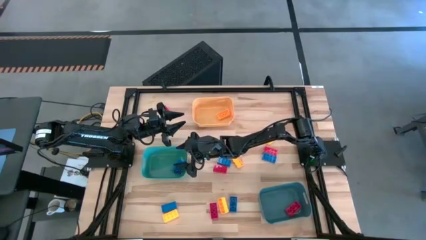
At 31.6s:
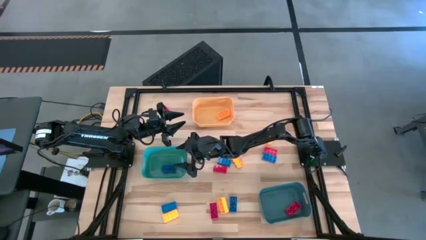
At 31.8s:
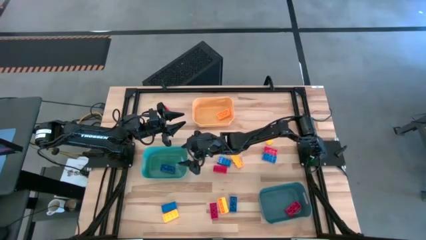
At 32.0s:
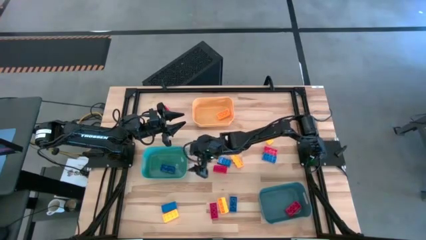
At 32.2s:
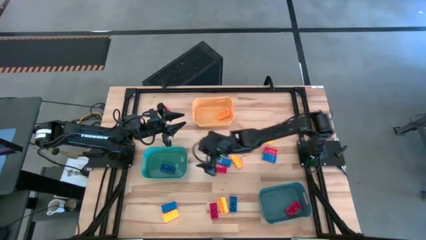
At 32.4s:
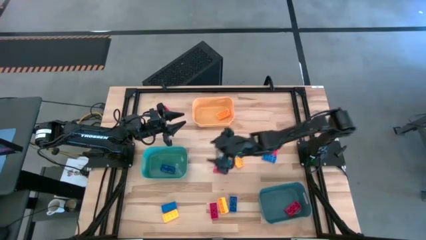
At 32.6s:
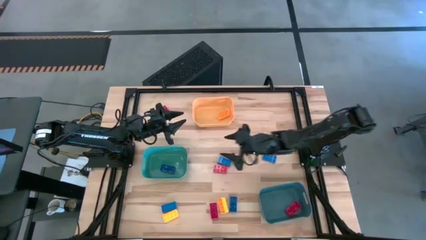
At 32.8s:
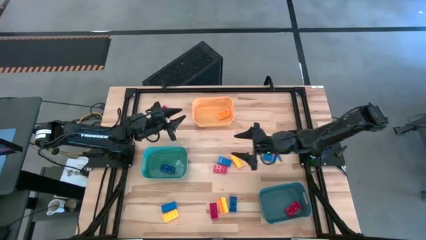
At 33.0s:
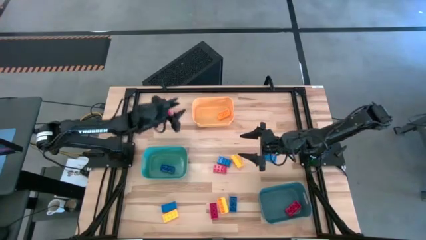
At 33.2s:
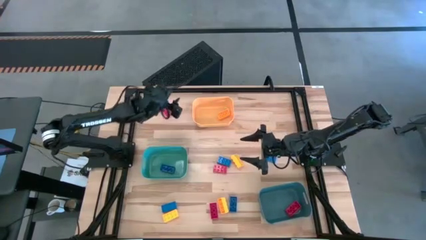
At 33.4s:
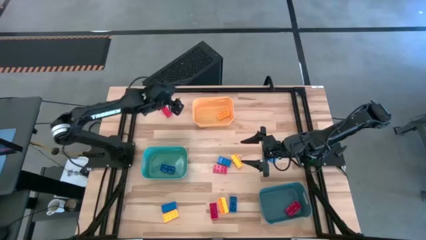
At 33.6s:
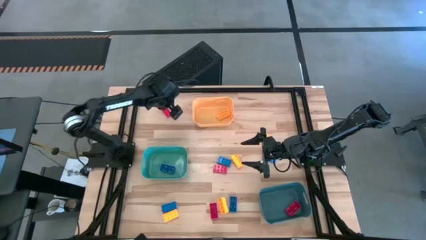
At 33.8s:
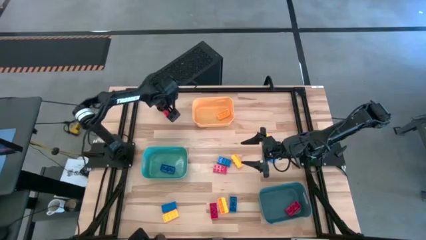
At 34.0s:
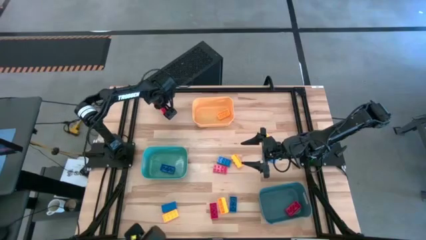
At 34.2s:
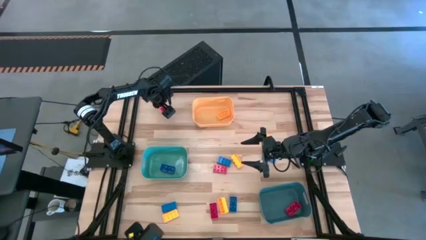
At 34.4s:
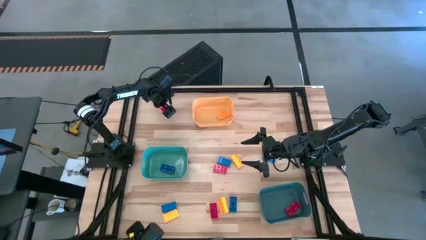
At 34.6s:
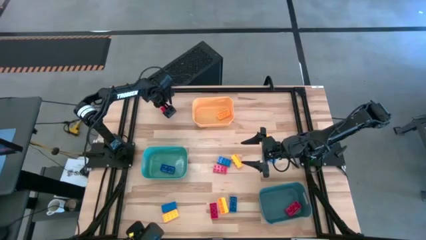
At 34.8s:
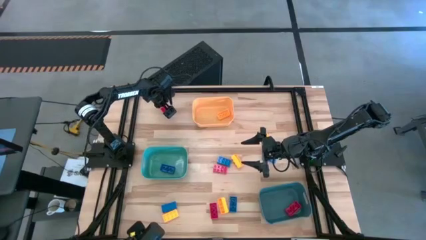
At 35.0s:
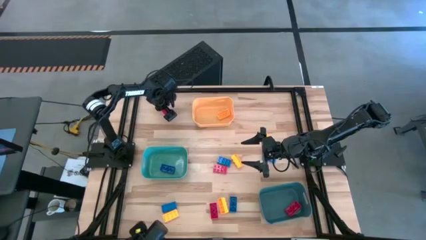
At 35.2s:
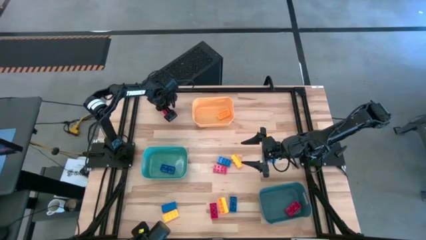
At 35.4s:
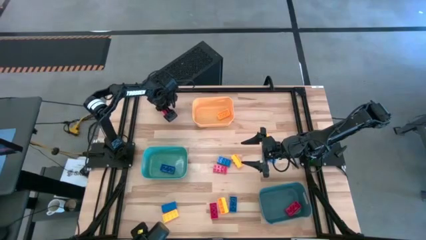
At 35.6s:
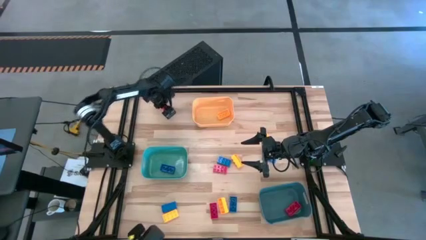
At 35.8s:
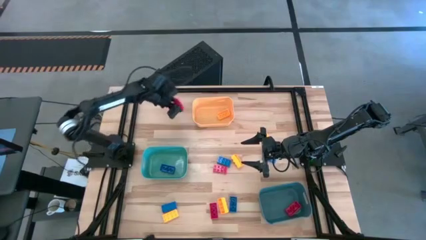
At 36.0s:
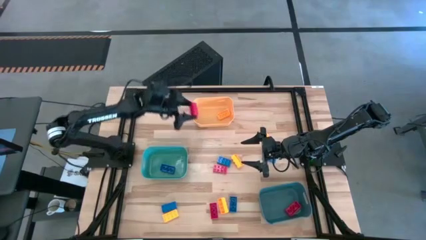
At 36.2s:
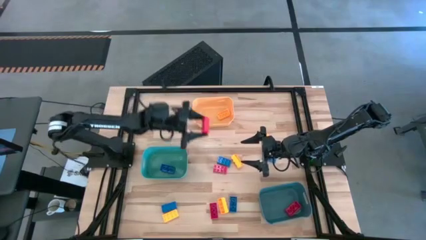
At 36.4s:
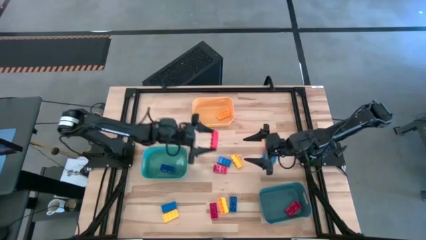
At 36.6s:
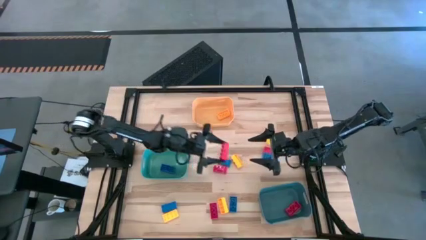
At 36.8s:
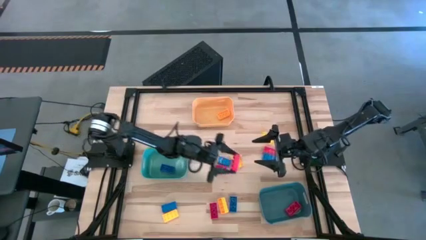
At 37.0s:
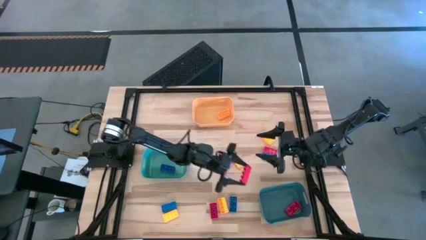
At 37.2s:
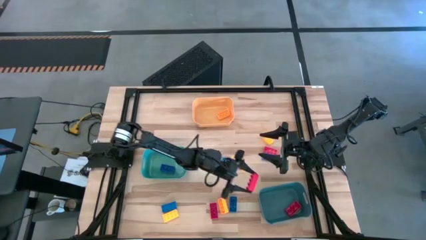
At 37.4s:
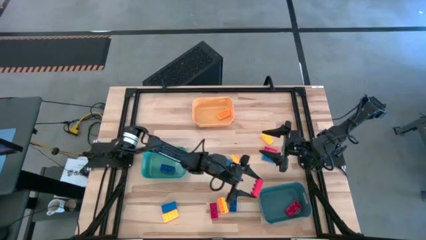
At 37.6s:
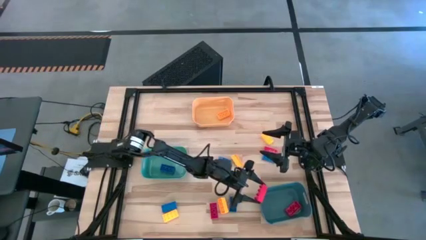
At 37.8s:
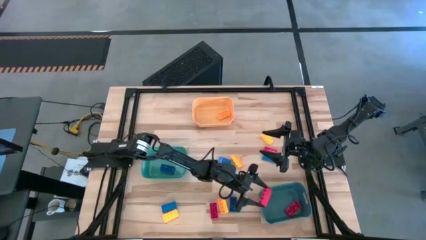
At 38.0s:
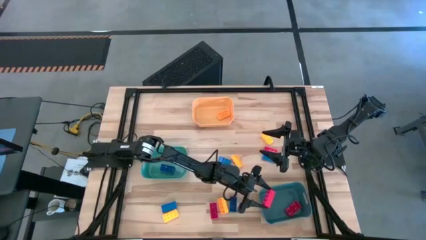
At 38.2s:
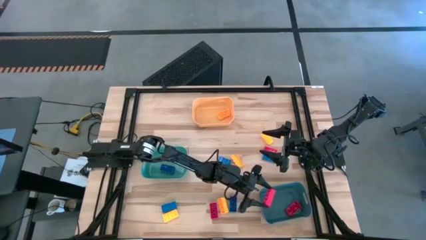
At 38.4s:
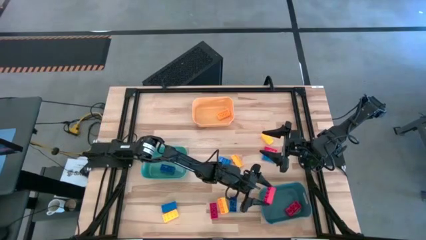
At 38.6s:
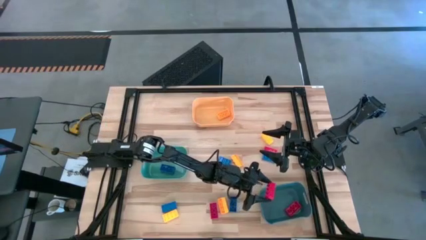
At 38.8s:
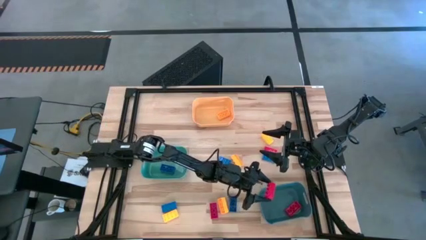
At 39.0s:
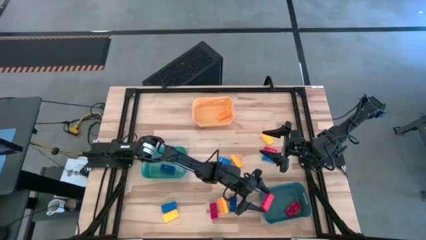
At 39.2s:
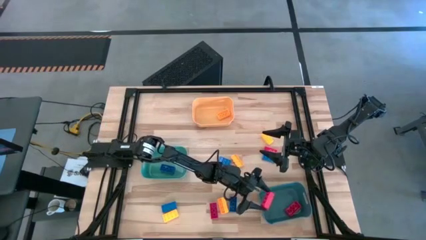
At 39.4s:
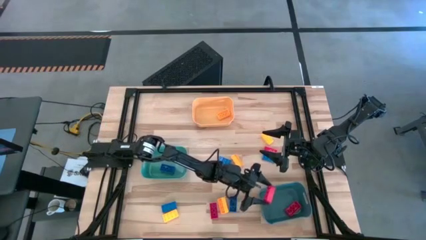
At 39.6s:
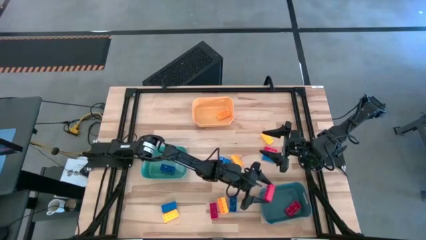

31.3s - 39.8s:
Task: Sort & place blocks by color
Put the red game piece into the blue bin

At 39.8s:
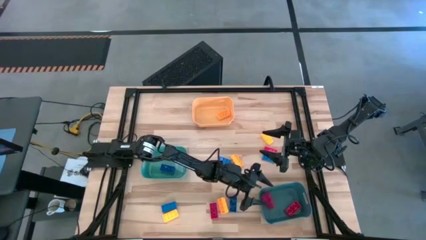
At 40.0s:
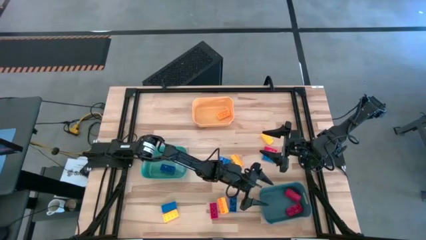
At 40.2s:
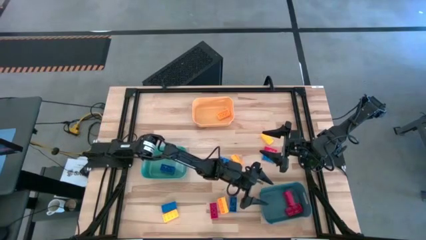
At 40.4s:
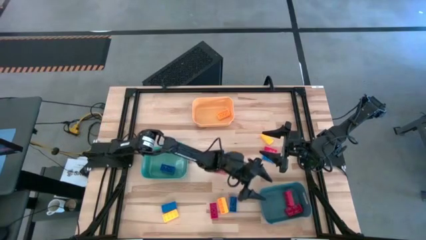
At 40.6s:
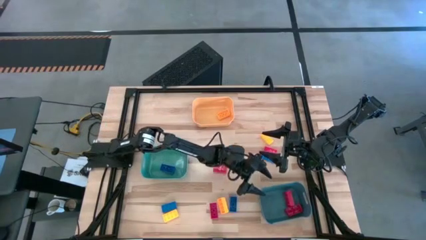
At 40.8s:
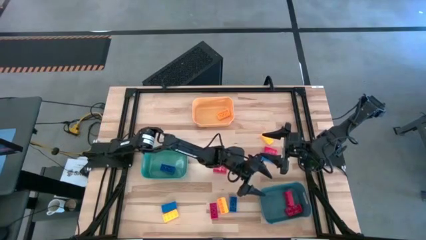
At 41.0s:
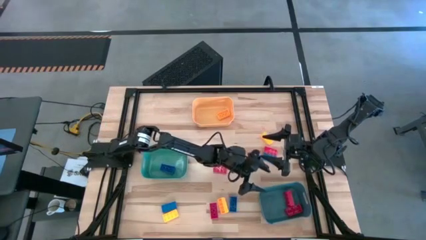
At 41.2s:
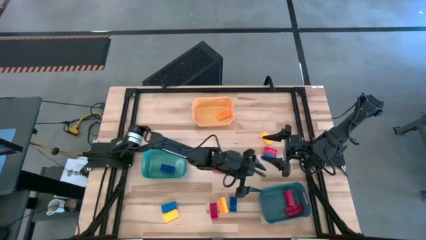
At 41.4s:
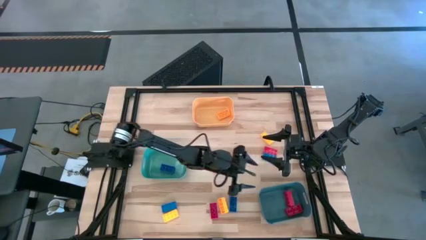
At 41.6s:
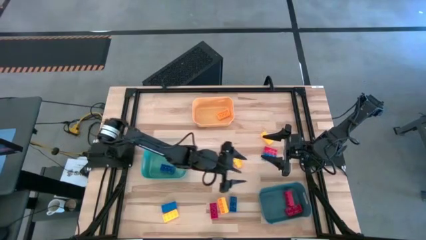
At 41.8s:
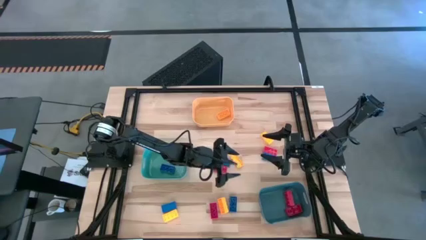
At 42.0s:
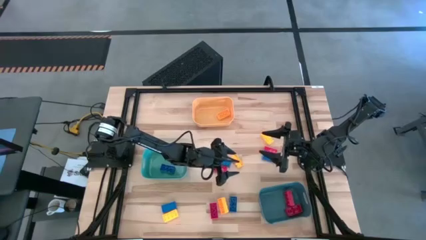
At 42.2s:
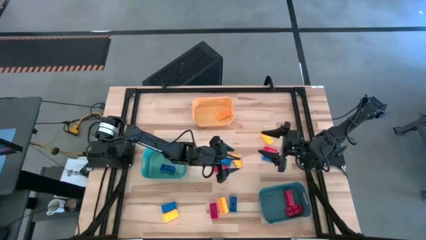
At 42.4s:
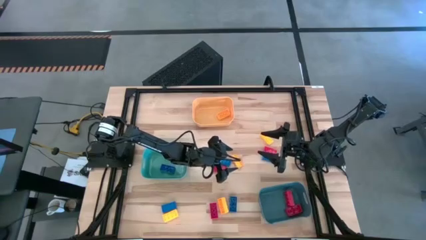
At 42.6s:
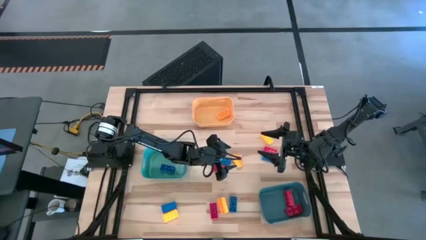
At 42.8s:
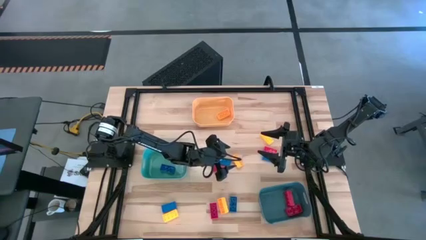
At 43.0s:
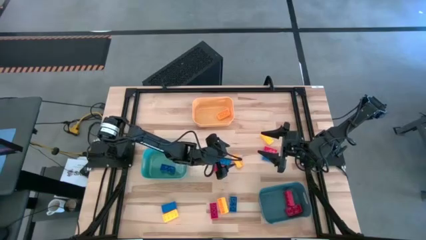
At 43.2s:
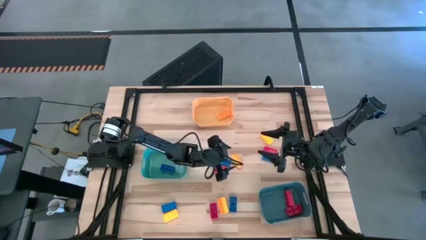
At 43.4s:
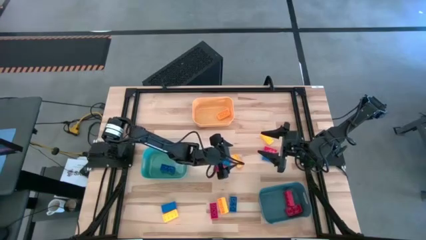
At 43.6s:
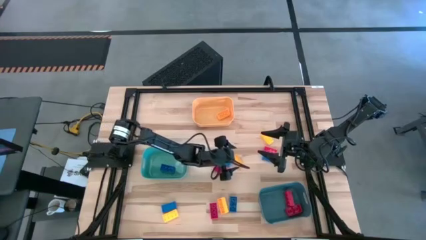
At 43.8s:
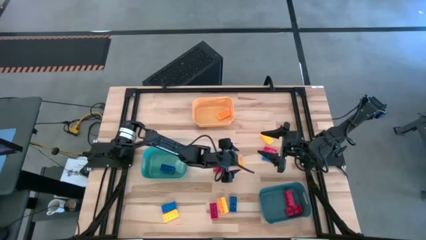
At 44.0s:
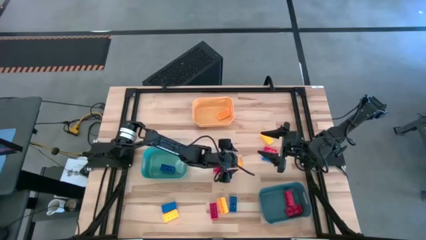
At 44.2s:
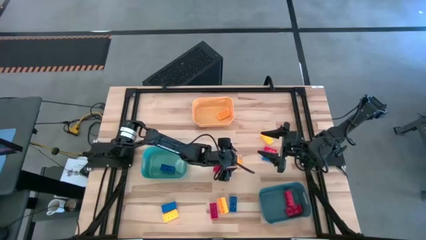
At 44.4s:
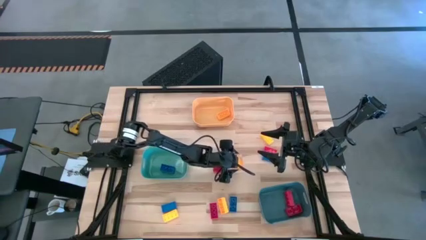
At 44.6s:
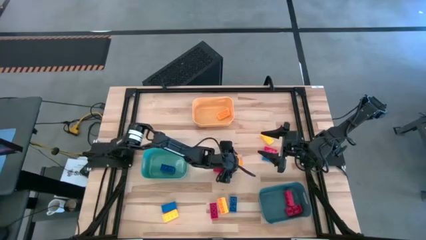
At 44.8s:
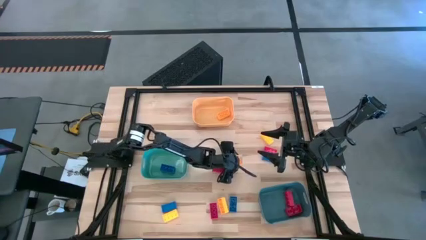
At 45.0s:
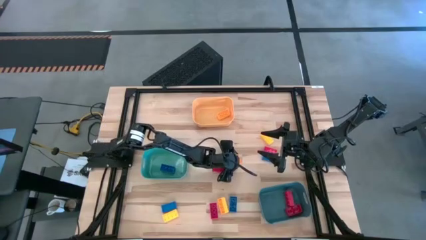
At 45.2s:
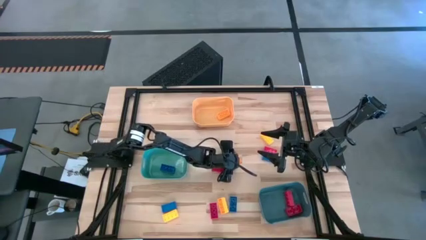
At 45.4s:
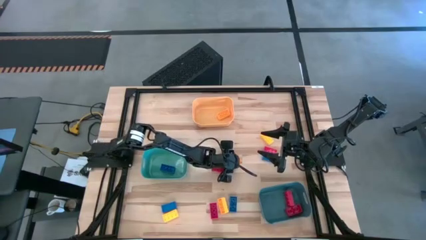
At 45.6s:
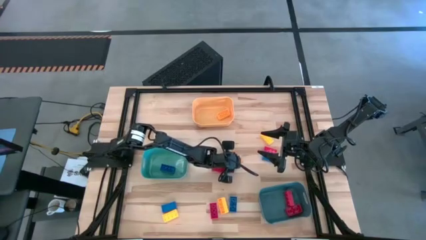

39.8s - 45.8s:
Put the yellow game piece into the orange bin

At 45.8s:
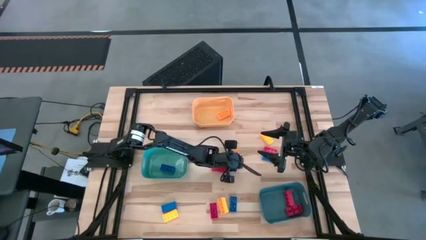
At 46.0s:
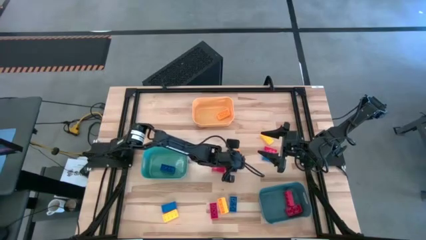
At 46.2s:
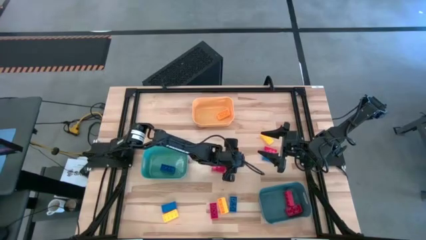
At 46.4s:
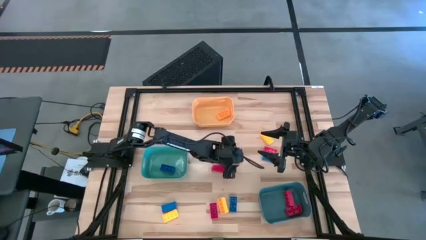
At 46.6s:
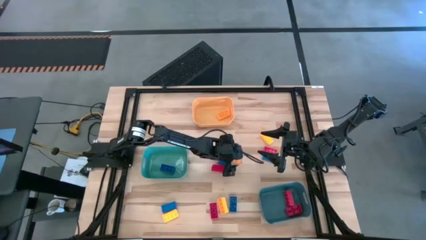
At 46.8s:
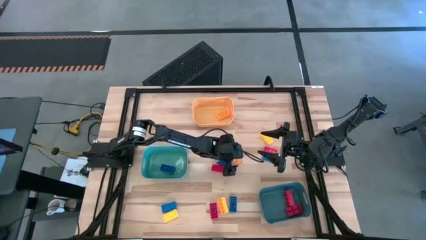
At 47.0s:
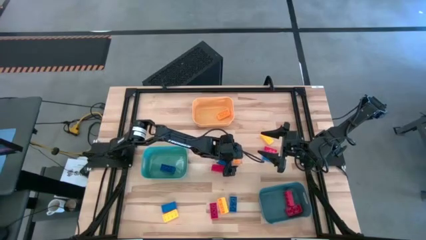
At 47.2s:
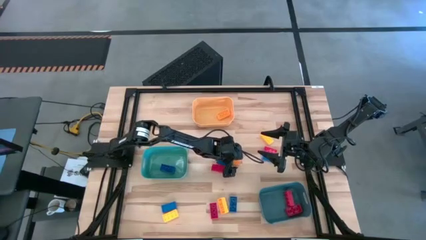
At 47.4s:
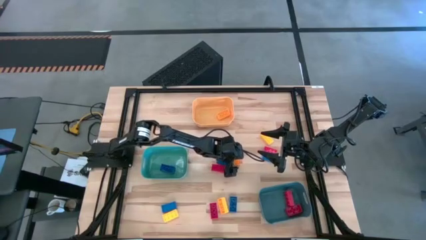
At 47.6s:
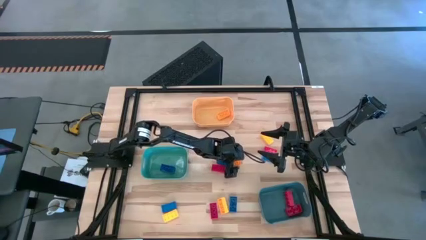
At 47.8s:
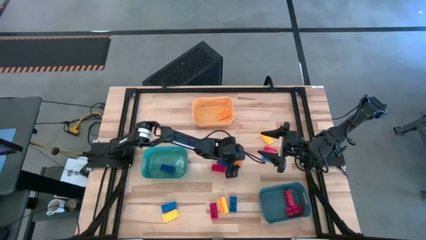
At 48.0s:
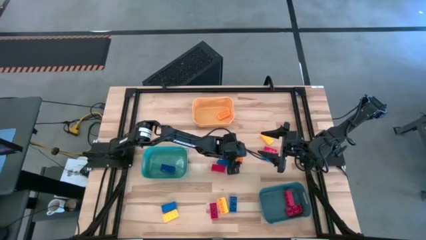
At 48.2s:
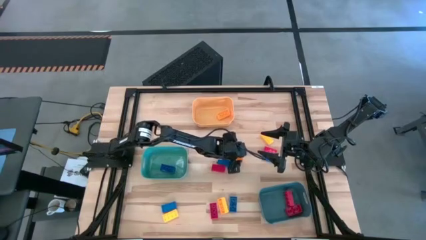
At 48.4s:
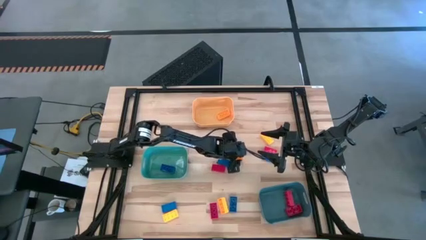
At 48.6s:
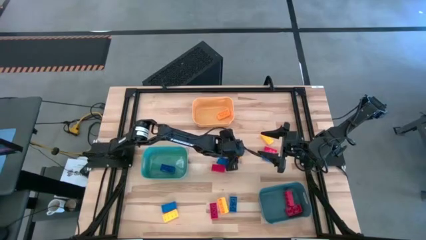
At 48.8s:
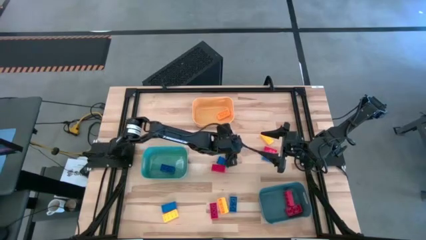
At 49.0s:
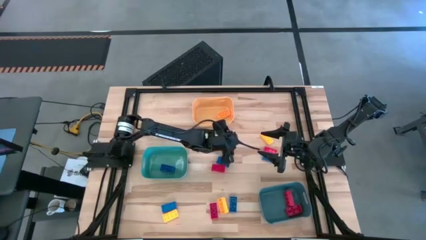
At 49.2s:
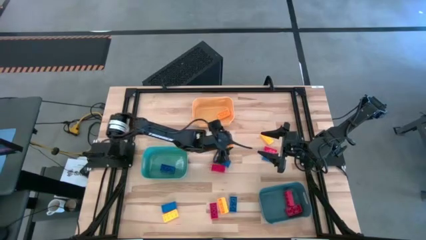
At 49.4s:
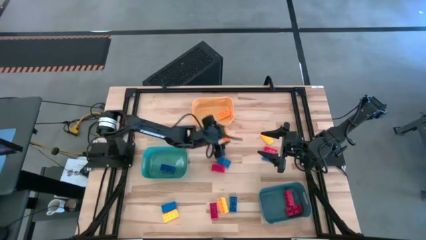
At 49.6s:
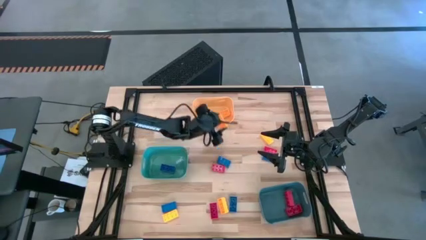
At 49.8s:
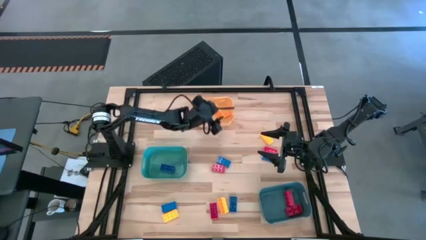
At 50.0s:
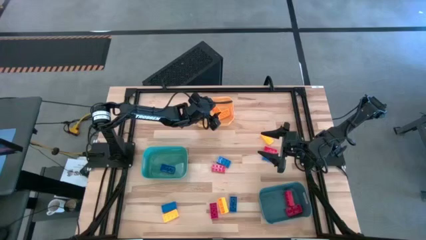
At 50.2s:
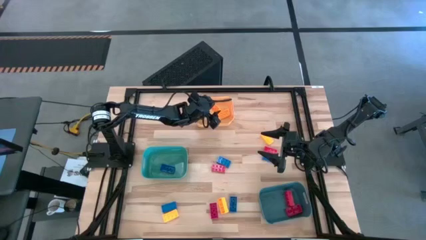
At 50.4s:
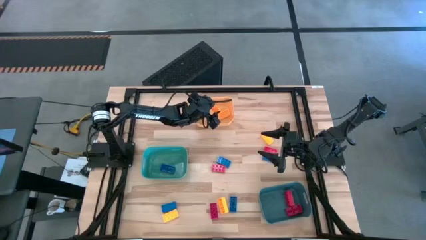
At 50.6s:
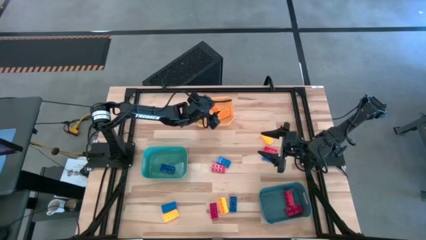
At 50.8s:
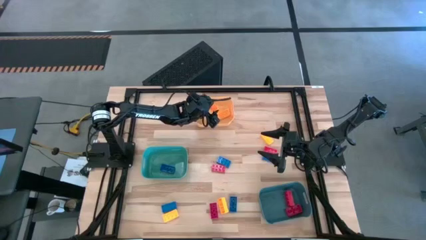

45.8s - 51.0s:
Put the yellow game piece into the orange bin
